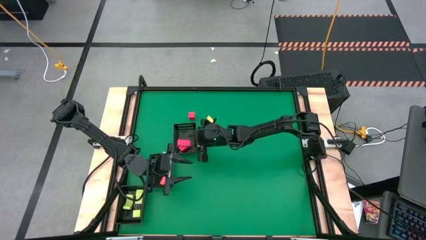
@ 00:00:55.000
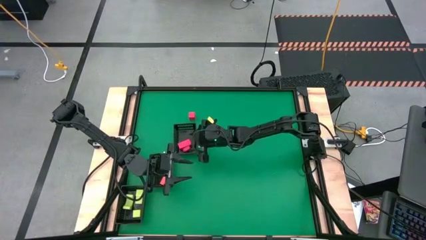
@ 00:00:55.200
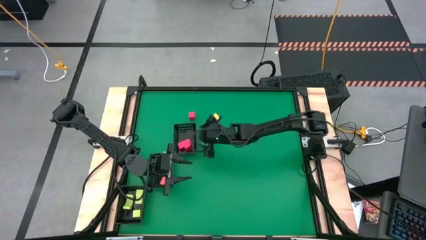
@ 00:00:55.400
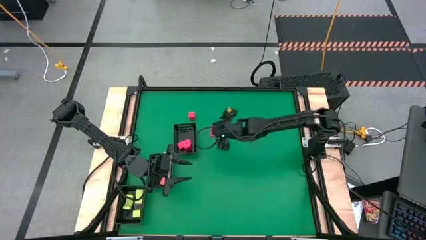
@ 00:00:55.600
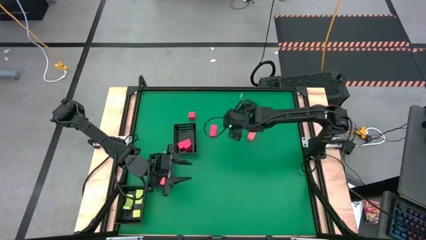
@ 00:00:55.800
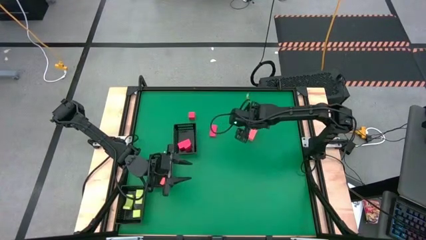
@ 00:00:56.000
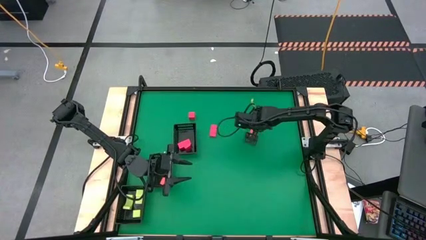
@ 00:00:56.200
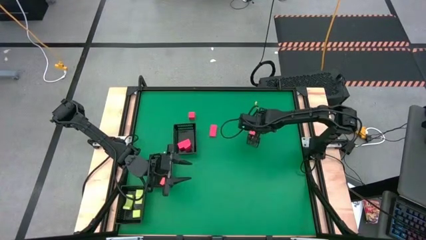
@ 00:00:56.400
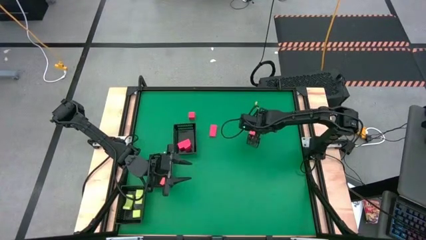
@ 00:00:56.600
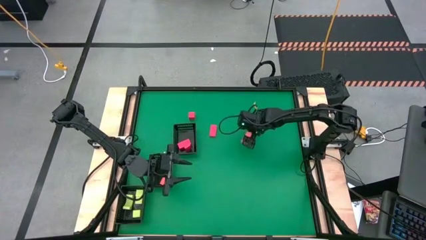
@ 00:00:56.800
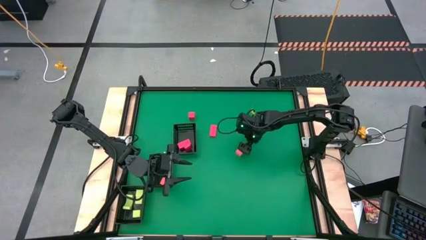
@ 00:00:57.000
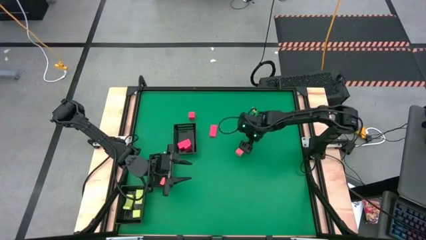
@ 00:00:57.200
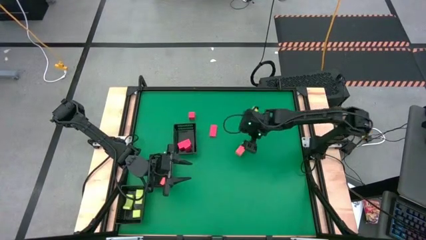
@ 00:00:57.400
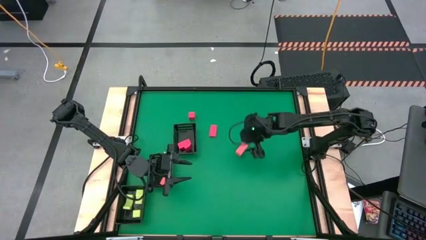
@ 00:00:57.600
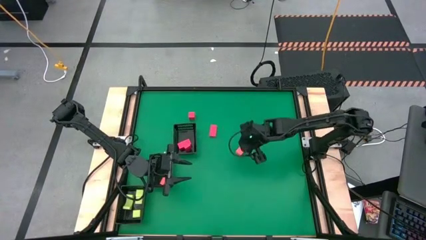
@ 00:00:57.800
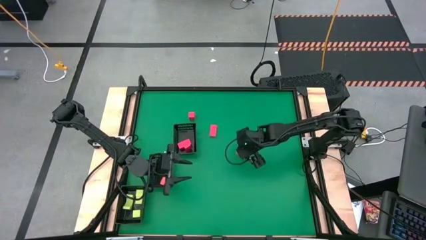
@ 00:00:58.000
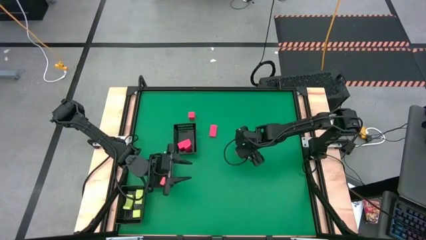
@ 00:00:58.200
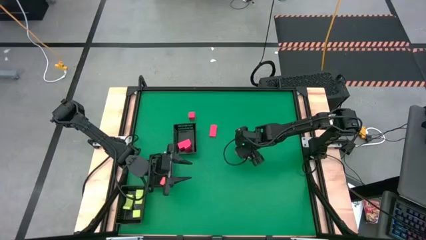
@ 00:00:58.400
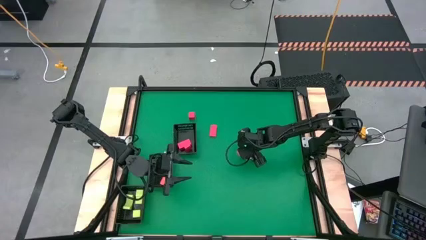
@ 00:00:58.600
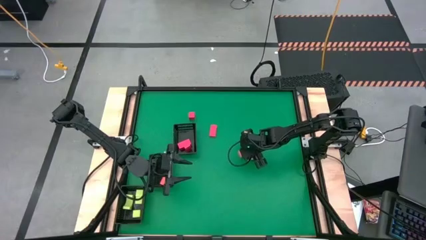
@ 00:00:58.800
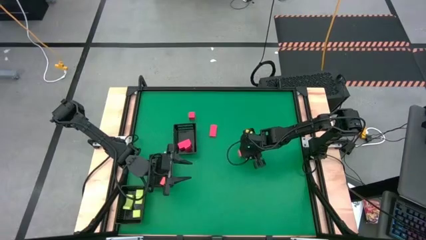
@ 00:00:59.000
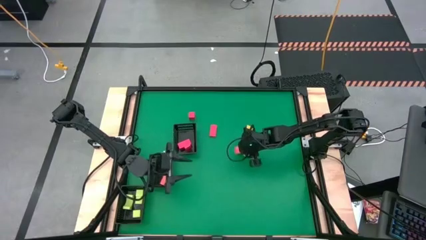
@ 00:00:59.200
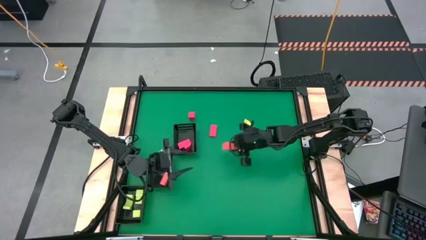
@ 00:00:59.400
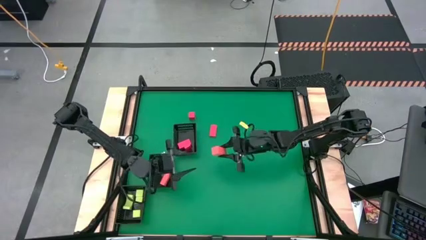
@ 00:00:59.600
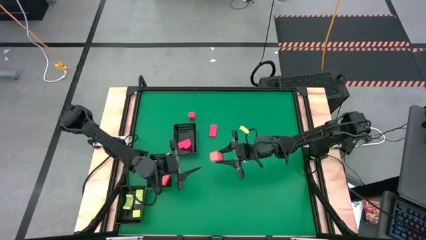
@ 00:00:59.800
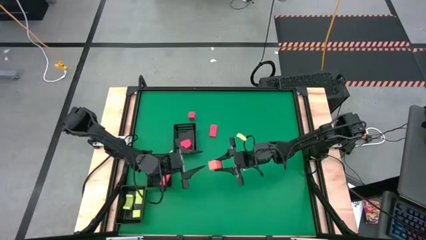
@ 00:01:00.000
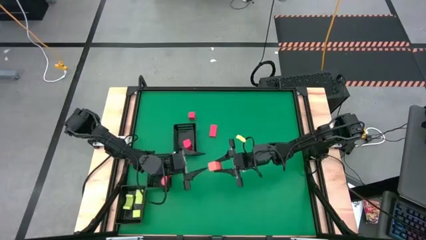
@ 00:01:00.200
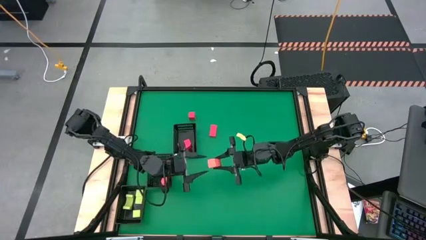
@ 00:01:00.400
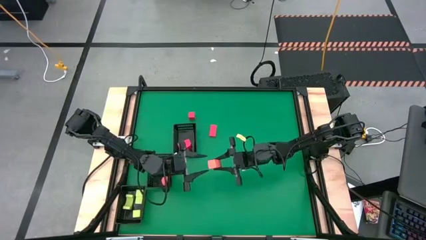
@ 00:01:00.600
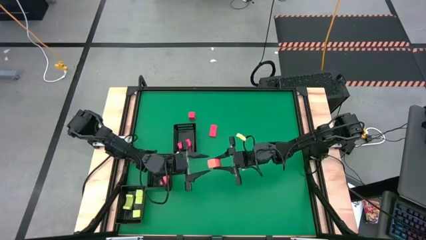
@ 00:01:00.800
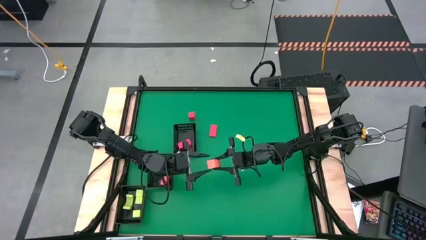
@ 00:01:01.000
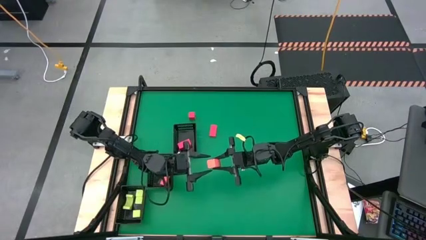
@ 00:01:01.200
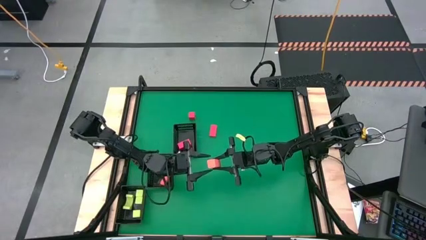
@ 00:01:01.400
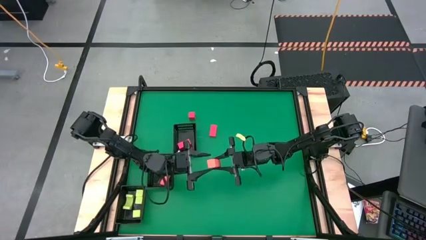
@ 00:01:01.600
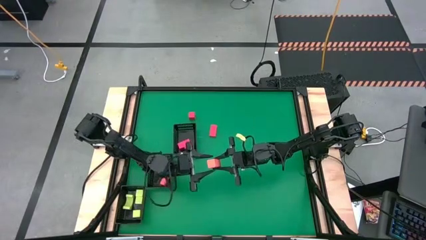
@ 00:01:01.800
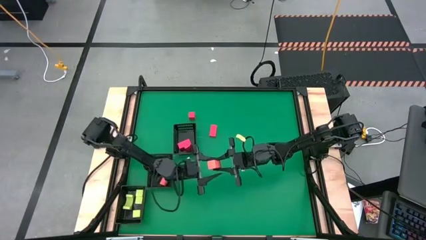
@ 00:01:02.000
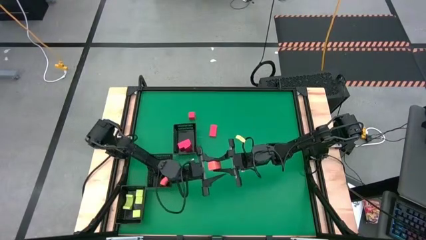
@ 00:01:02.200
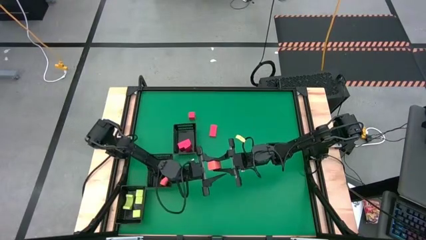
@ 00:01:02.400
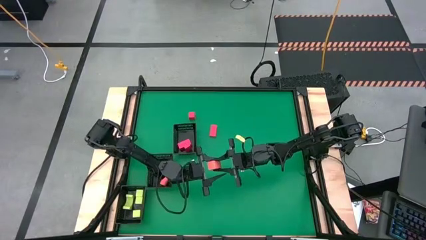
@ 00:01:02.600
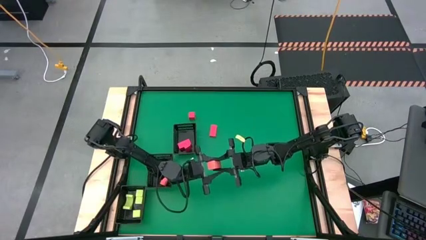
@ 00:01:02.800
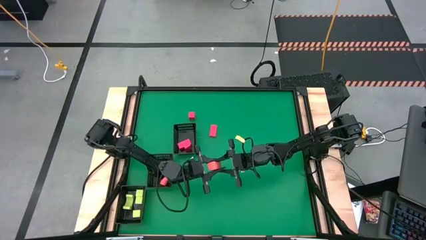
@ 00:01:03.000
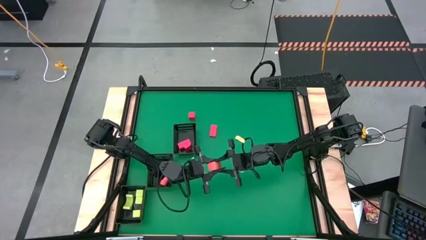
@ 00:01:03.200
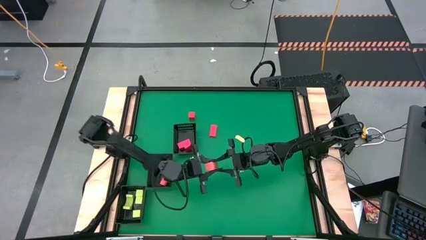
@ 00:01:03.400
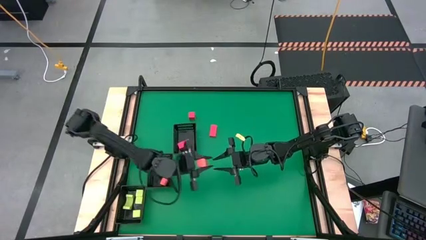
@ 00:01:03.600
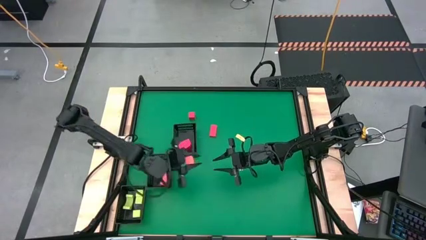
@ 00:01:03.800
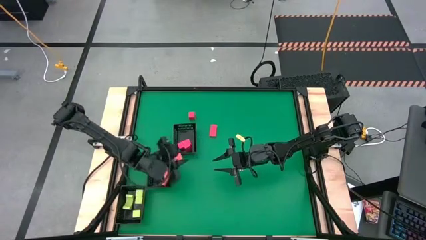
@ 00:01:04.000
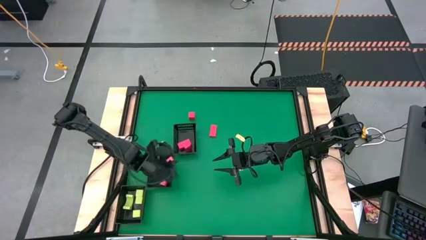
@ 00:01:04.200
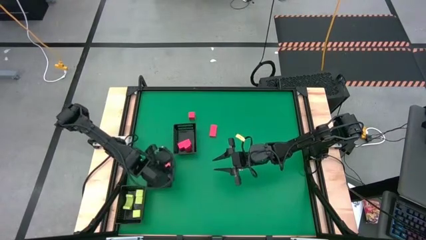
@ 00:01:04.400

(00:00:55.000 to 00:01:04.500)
Task: Sort & place blocks by color
Put the orange block into the middle black bin

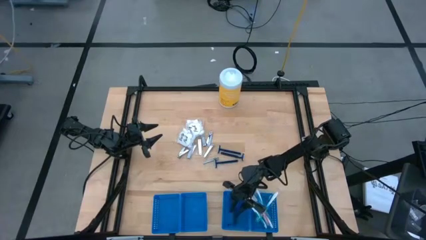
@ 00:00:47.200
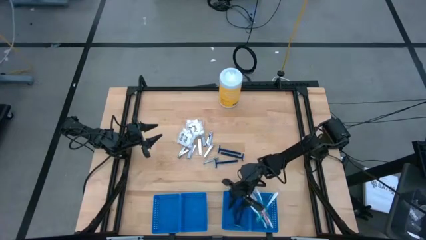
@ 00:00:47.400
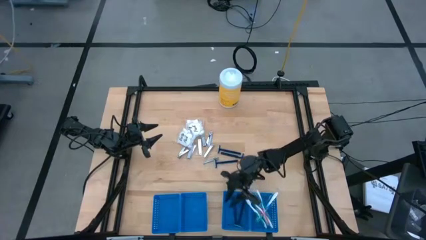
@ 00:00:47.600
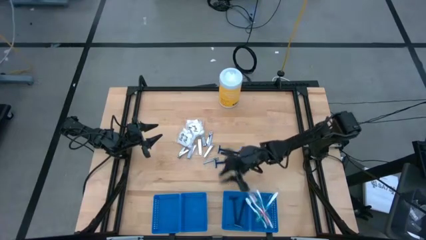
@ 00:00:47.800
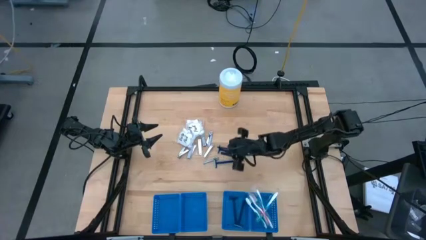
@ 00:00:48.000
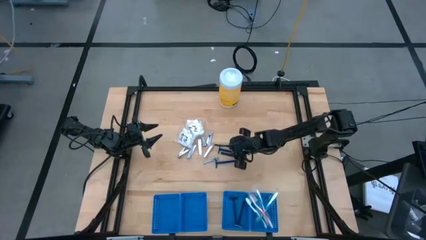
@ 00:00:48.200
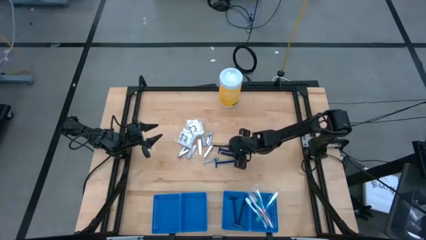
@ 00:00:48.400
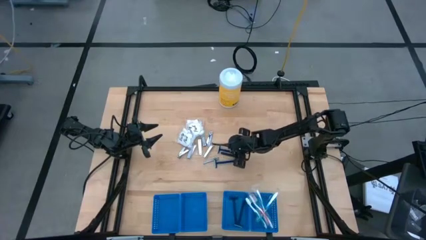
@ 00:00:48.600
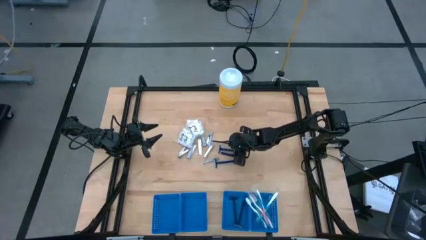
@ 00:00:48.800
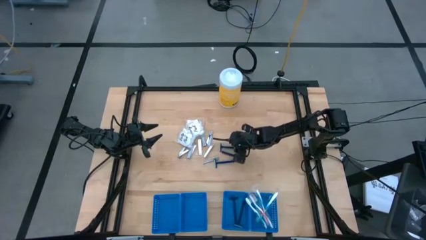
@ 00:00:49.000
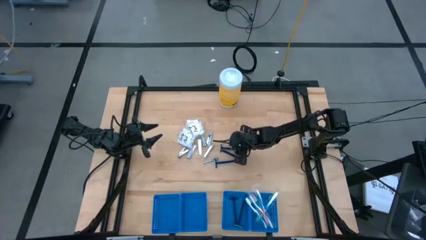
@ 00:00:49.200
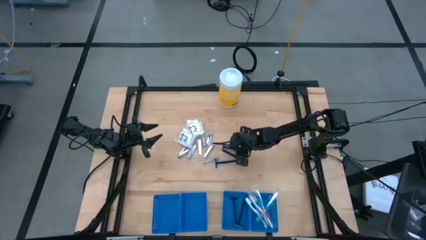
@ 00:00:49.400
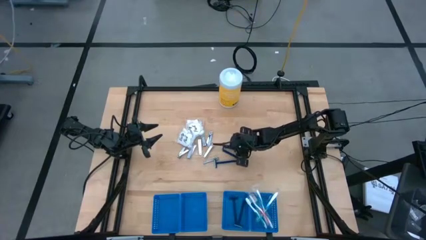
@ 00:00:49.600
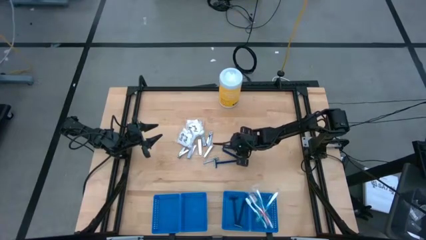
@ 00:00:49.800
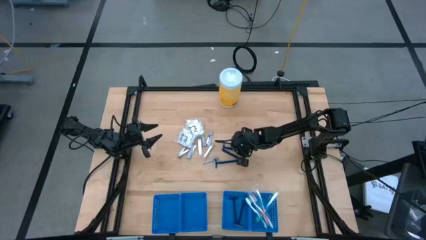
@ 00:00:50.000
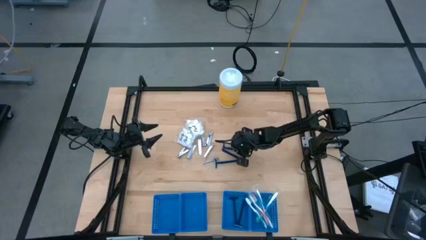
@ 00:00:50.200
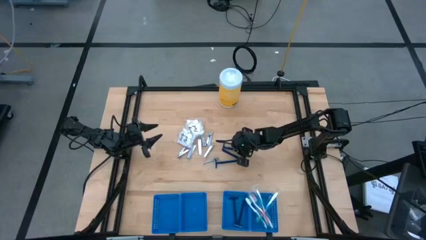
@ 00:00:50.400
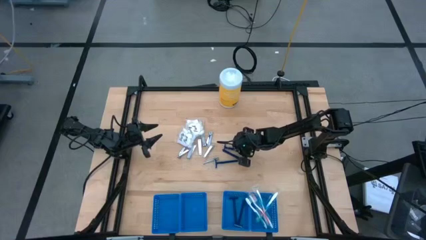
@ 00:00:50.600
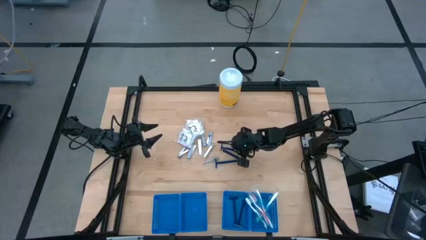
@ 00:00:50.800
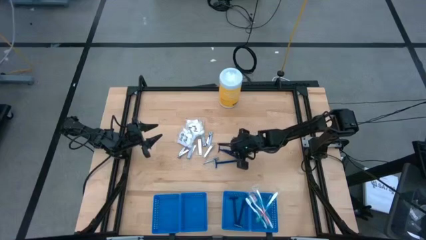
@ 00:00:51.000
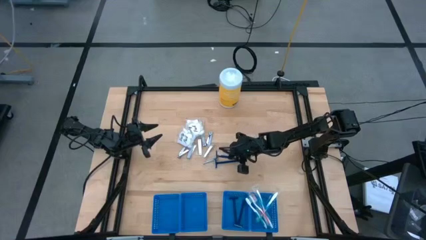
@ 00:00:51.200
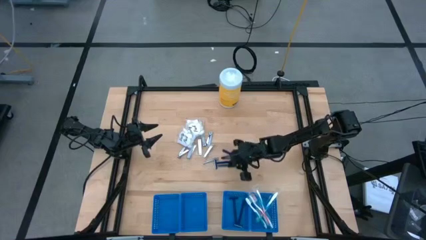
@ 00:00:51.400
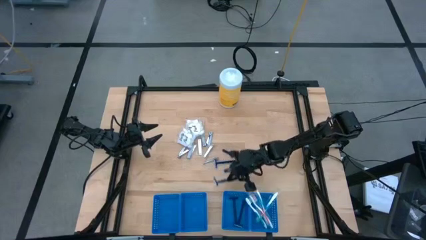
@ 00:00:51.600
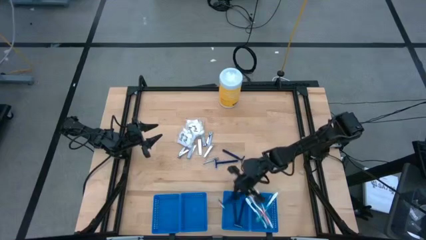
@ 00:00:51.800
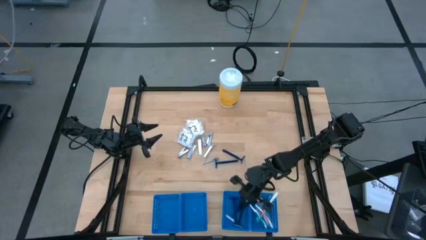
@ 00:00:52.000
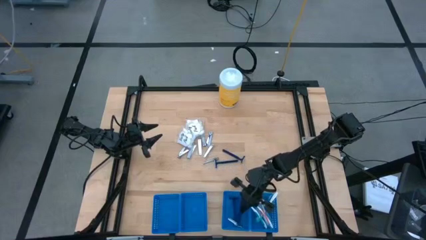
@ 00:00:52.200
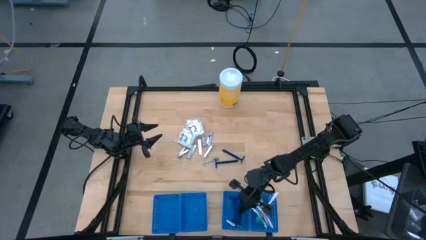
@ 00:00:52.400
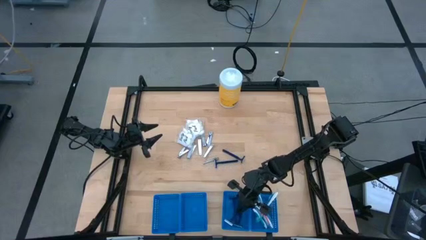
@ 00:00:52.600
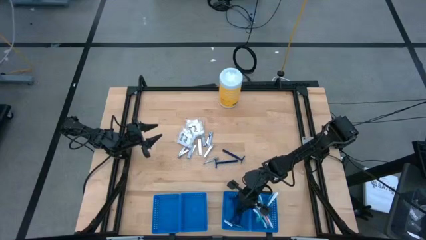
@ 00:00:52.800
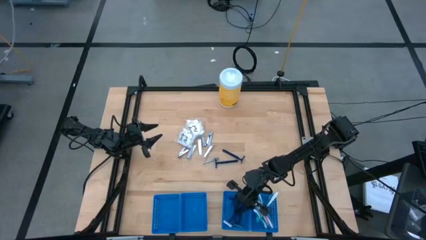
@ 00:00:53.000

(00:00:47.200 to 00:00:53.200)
Task: Pick & Place Travel size toiletries
Put the blue razor into the blue basket
